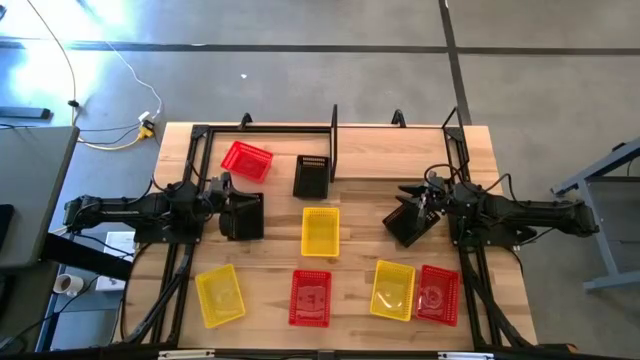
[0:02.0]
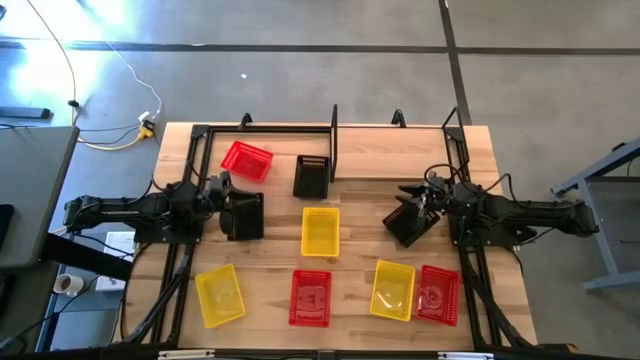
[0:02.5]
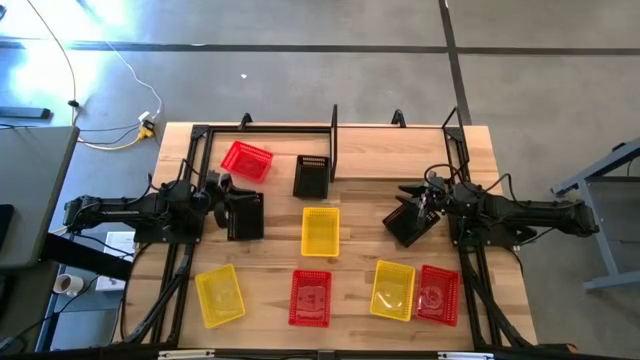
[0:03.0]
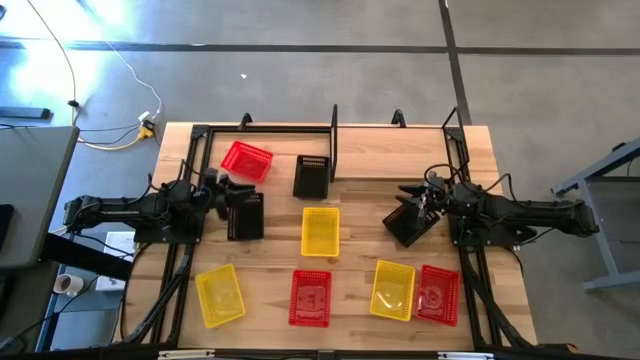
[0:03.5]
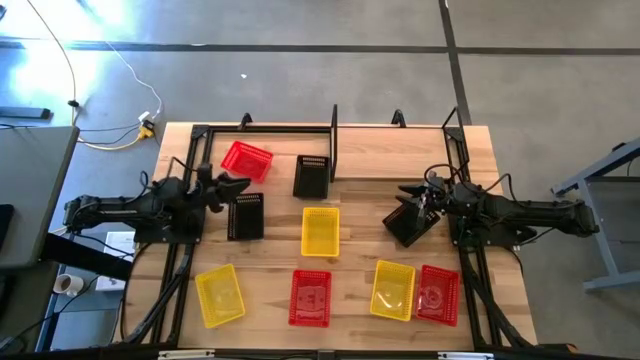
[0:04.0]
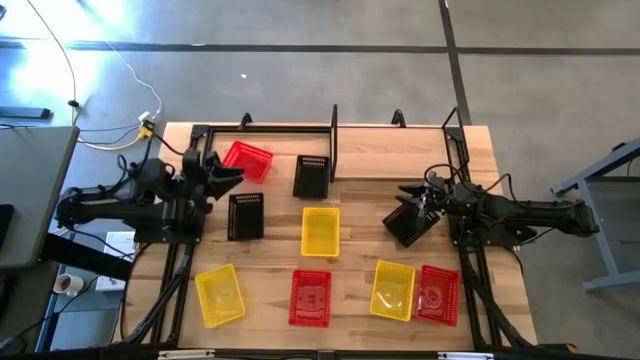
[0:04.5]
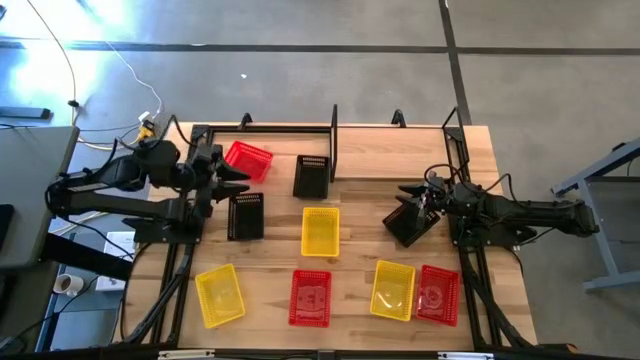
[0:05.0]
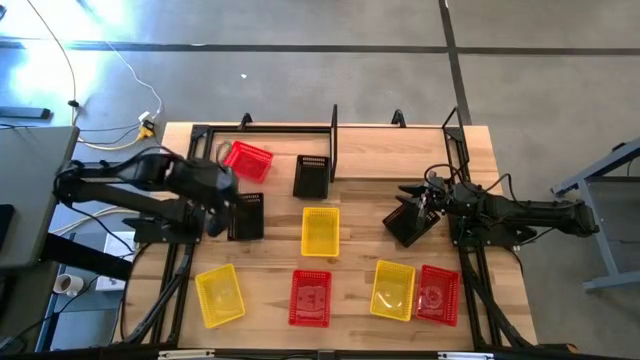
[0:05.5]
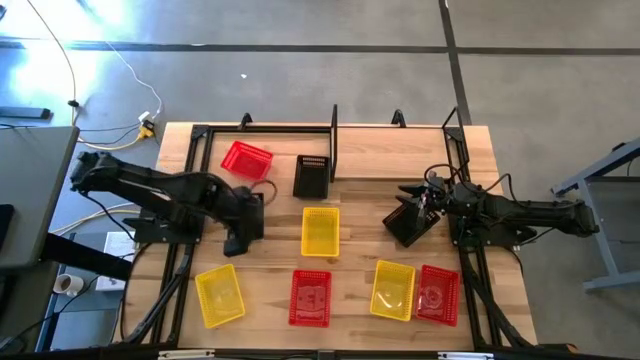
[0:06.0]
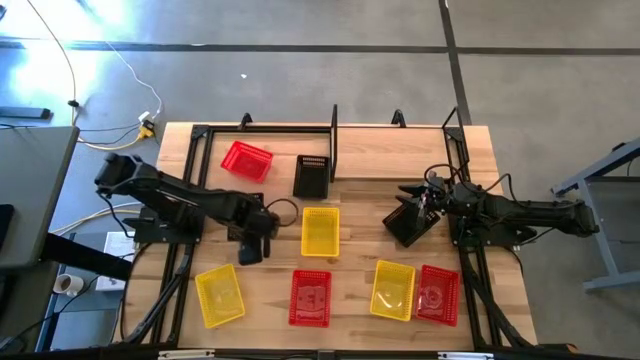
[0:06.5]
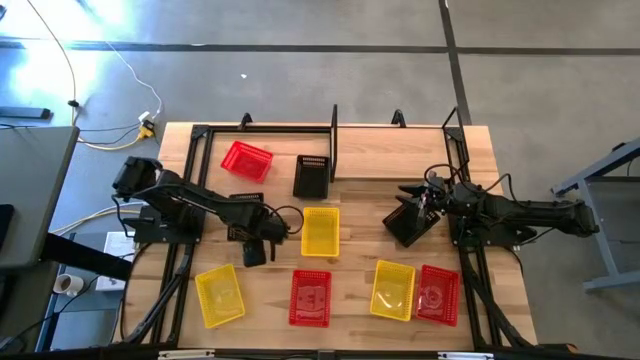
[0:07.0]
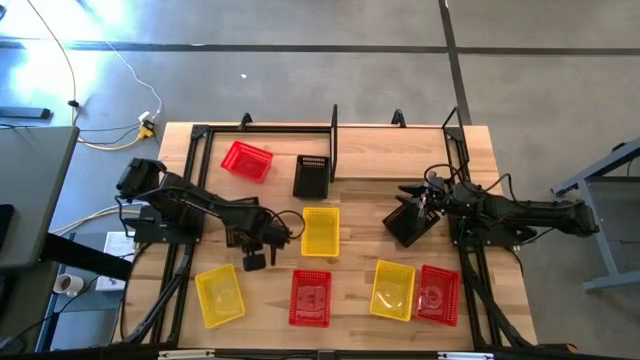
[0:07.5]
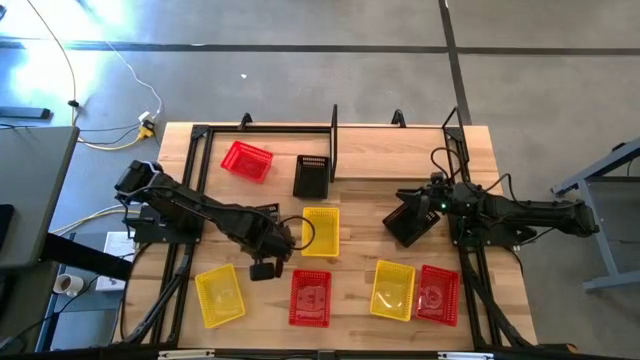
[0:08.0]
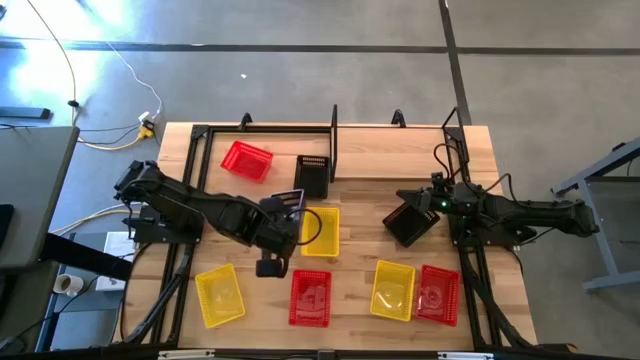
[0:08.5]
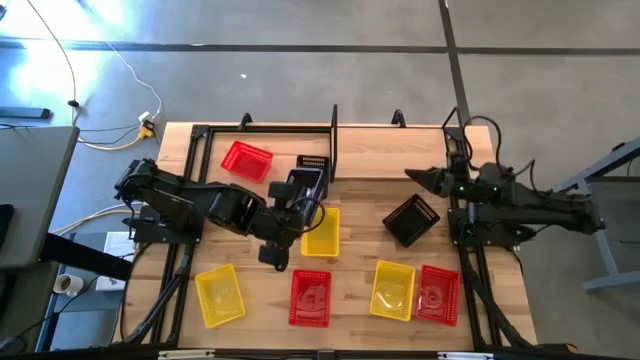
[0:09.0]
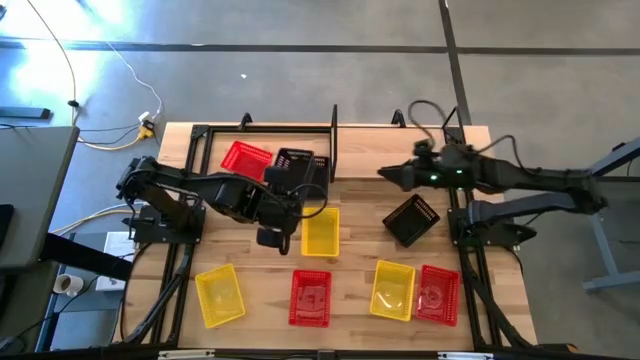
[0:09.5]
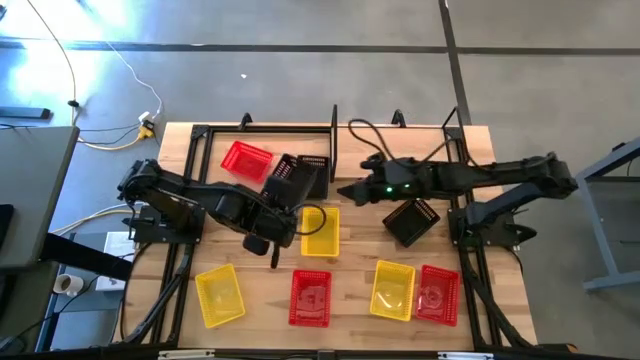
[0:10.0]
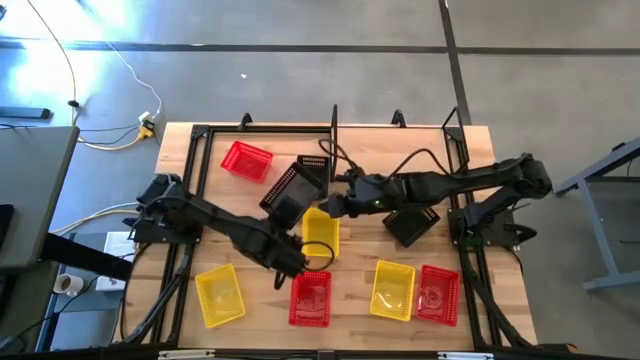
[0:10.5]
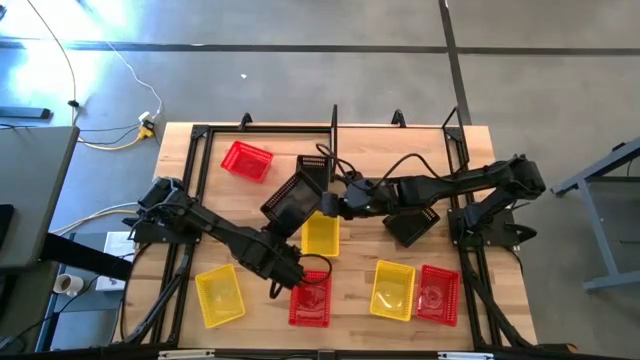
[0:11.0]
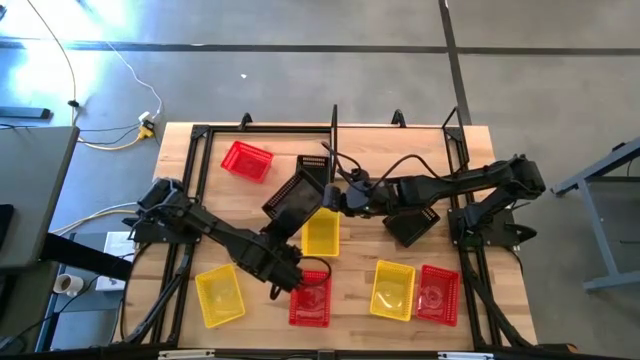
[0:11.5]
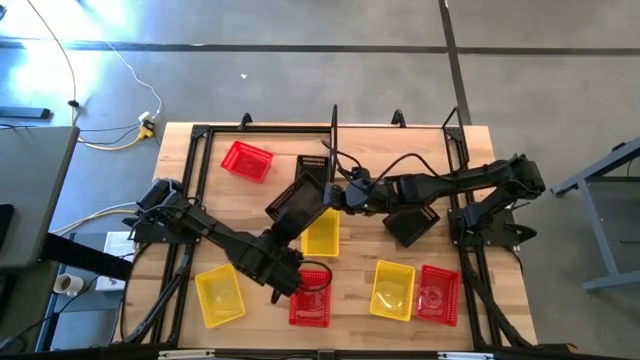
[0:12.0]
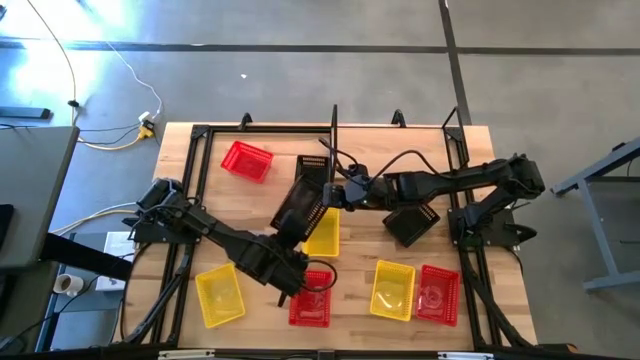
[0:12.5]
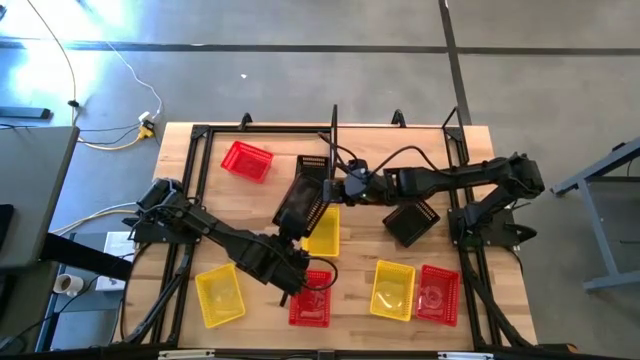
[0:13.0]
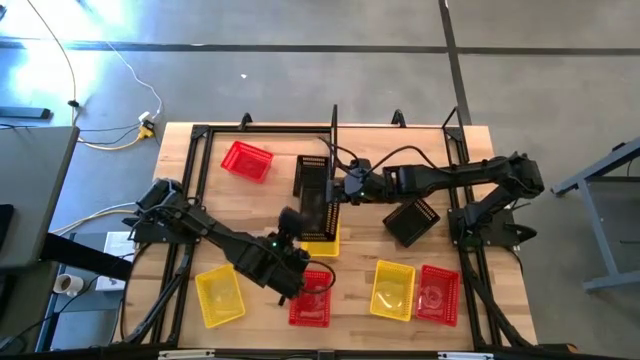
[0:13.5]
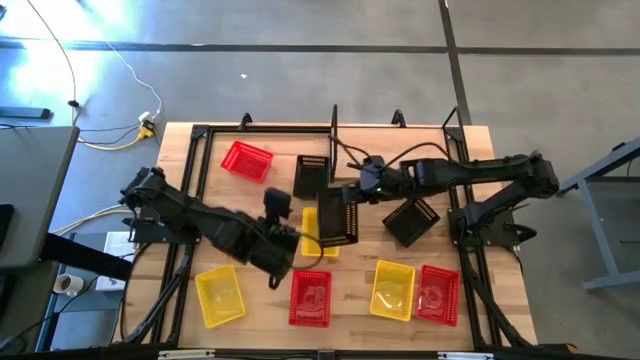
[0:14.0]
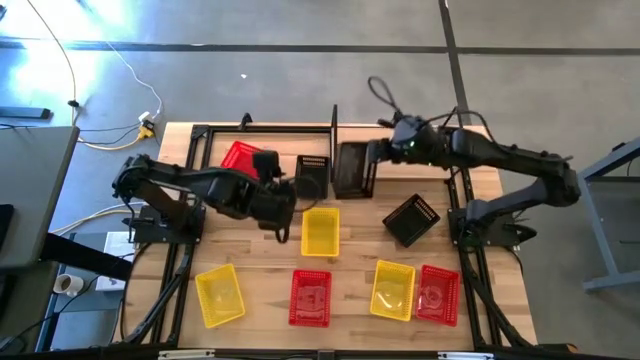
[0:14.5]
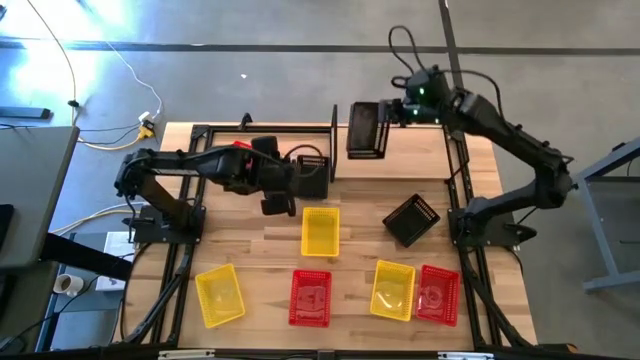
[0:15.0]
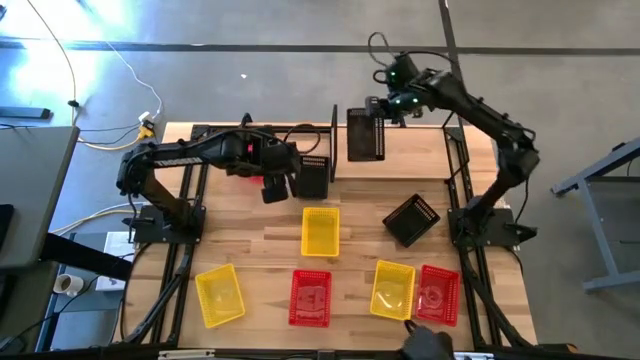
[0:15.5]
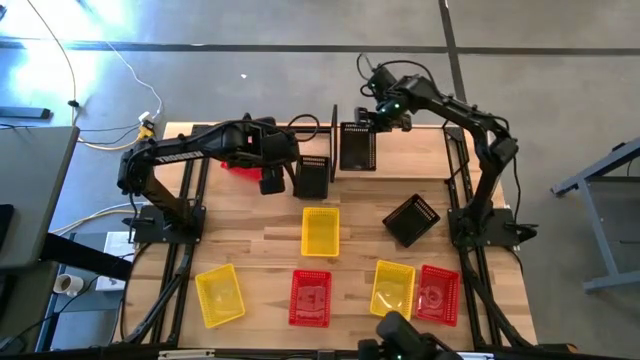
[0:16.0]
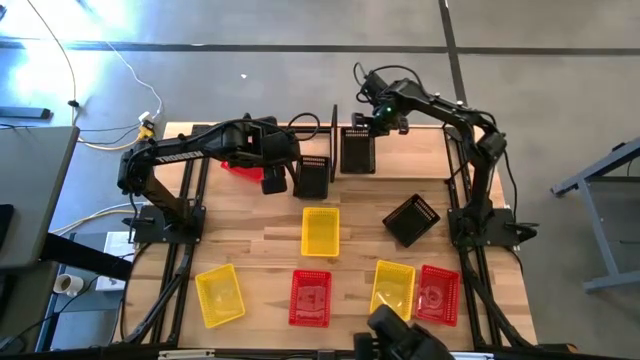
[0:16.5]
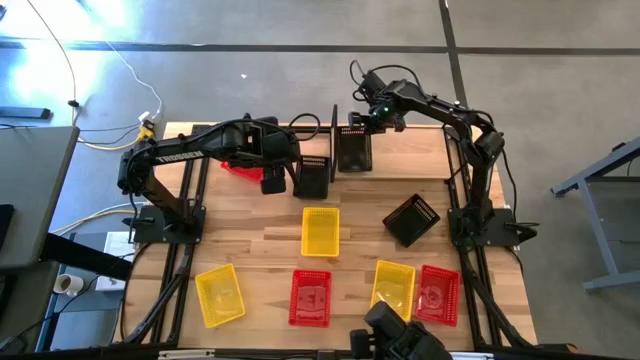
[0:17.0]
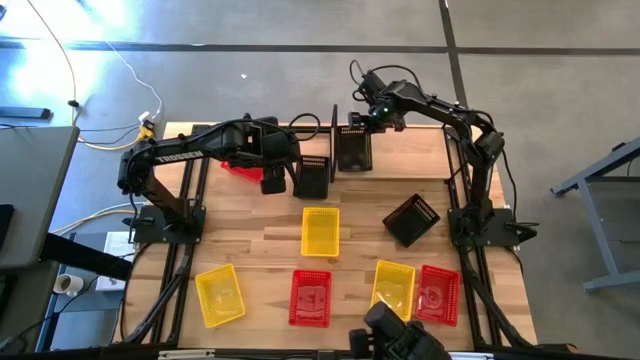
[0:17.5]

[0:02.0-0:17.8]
Task: Stack baskets on shelf by color
Put the bottom left black basket on the shelf

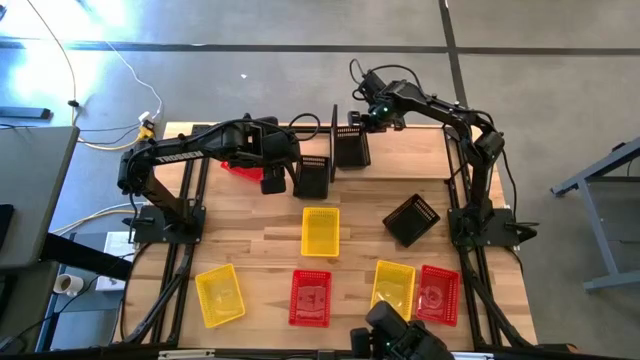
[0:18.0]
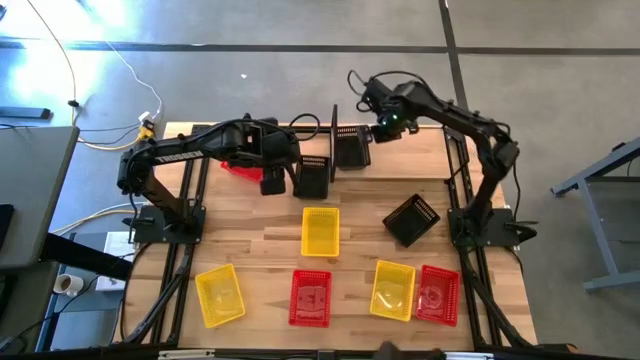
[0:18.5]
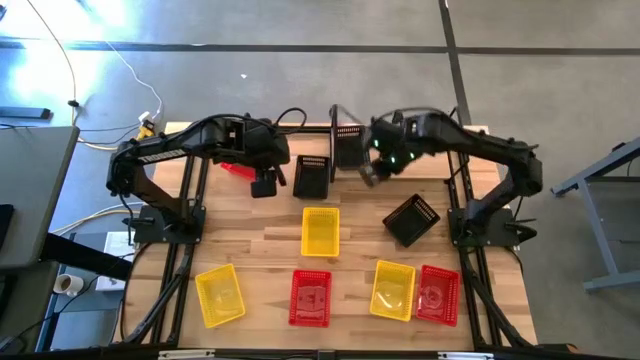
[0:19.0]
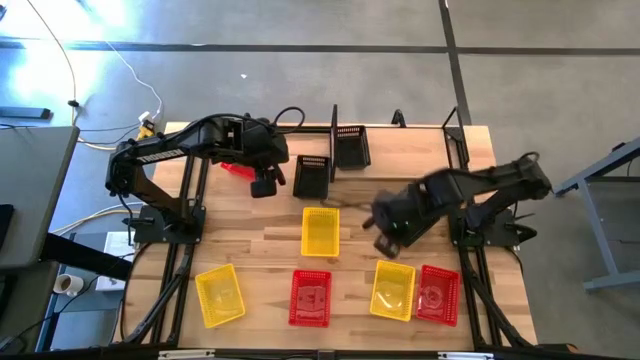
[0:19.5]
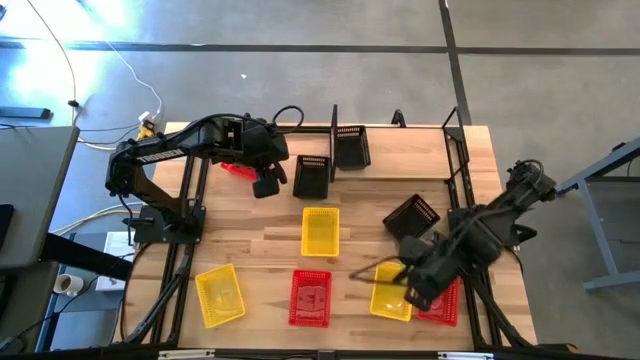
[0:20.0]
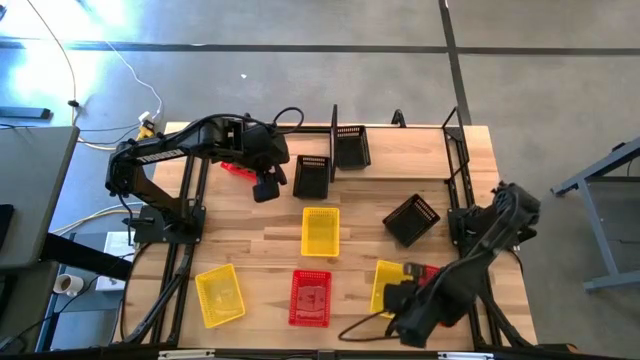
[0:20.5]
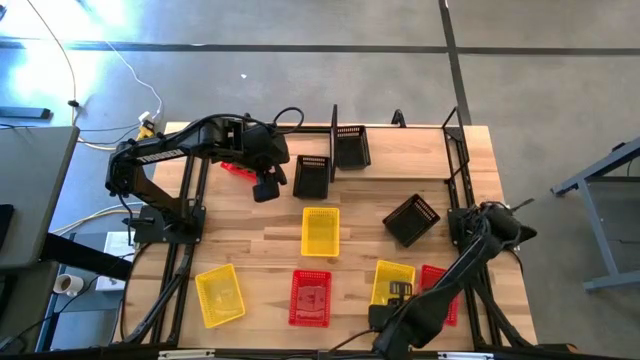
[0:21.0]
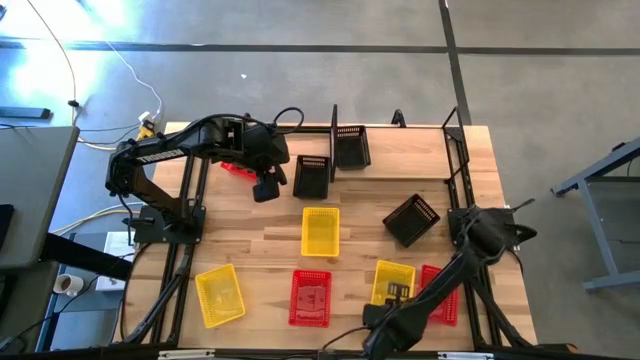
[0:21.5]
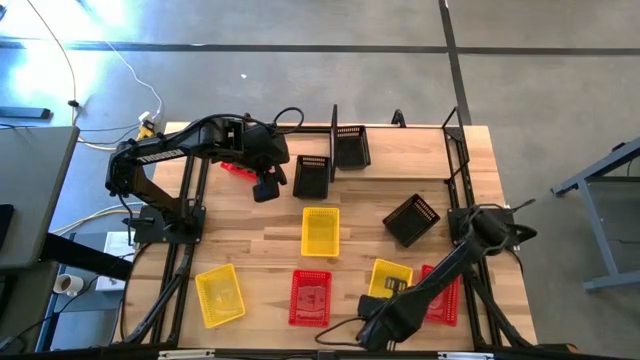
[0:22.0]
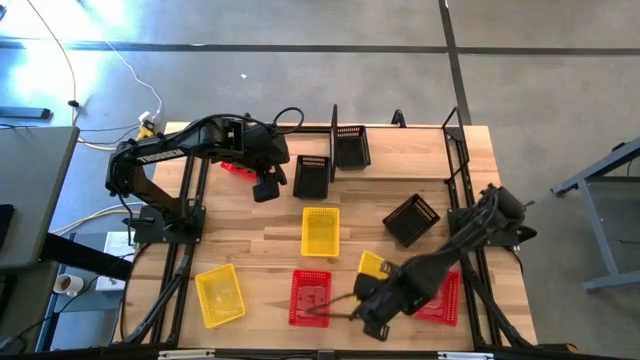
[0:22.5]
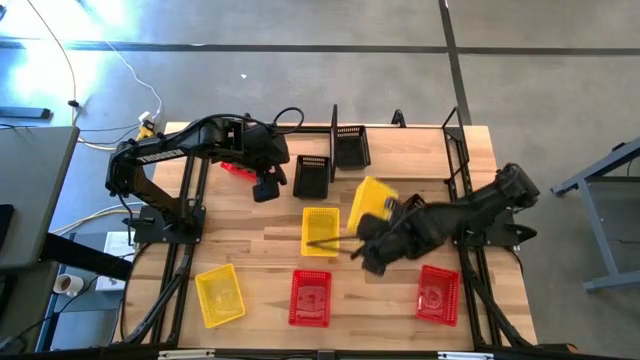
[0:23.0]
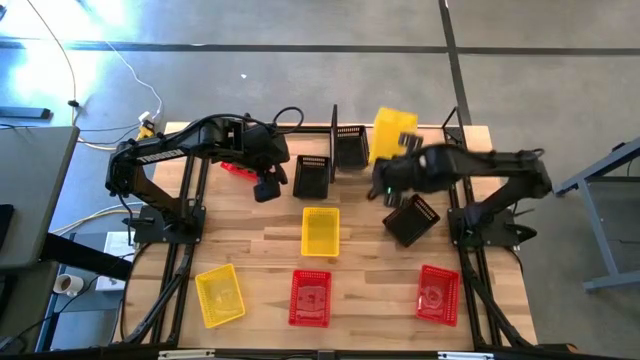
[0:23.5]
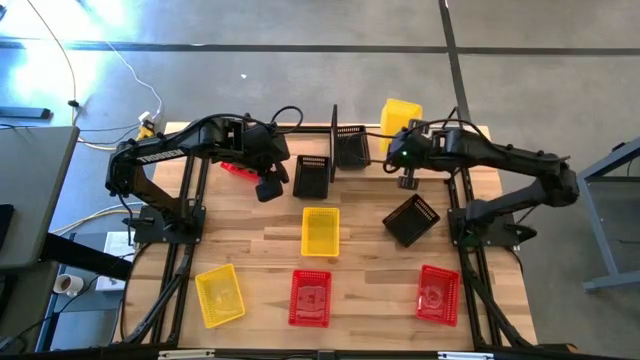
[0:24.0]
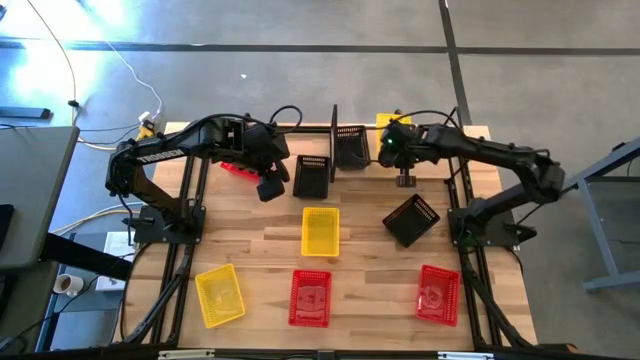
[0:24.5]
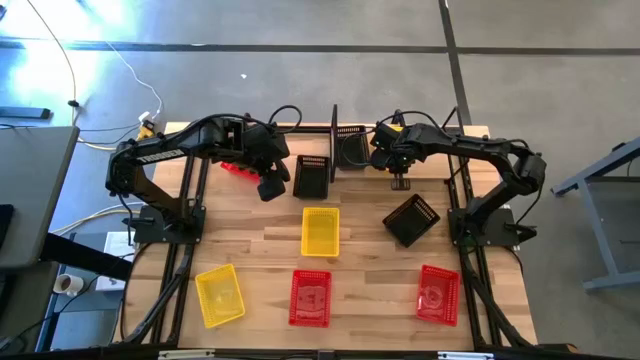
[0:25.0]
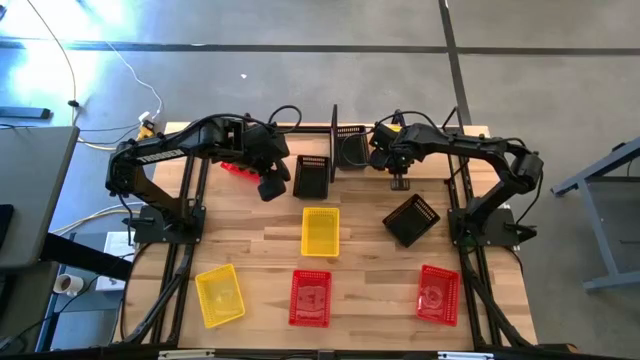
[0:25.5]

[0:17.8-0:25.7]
Put the bottom right yellow basket on the shelf
